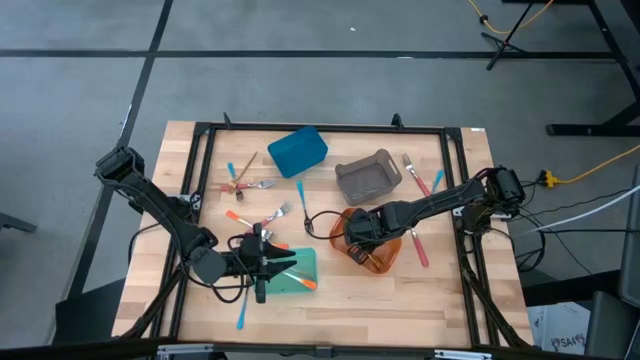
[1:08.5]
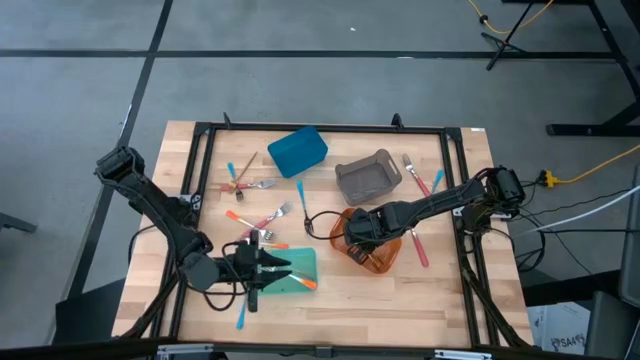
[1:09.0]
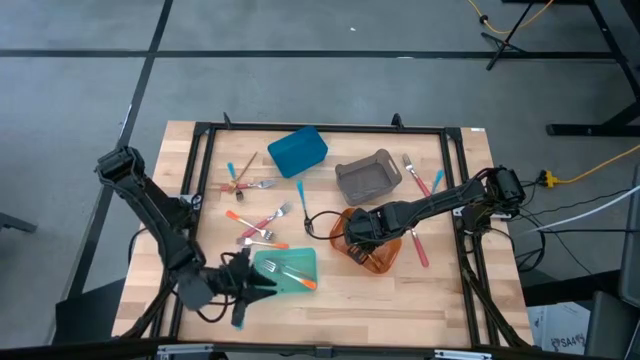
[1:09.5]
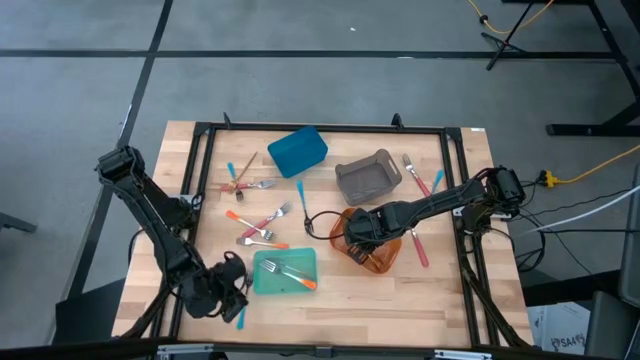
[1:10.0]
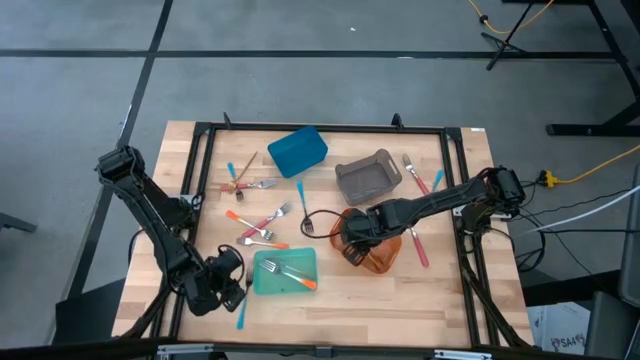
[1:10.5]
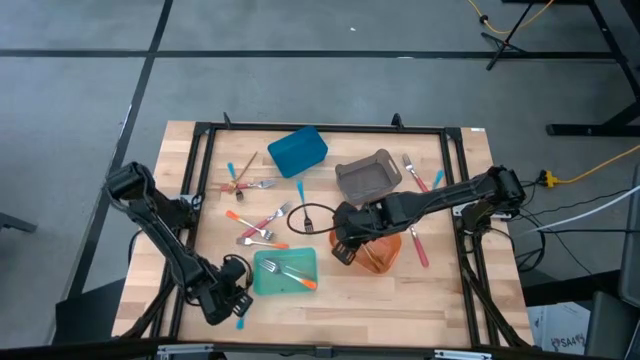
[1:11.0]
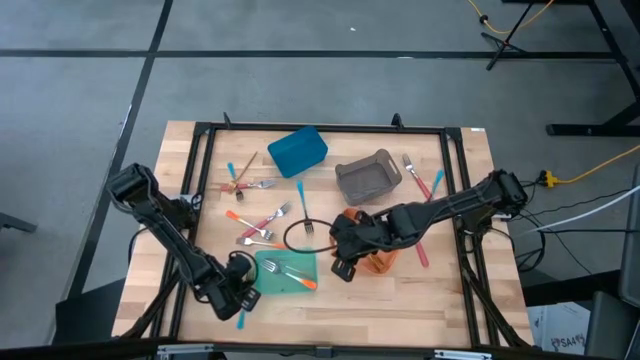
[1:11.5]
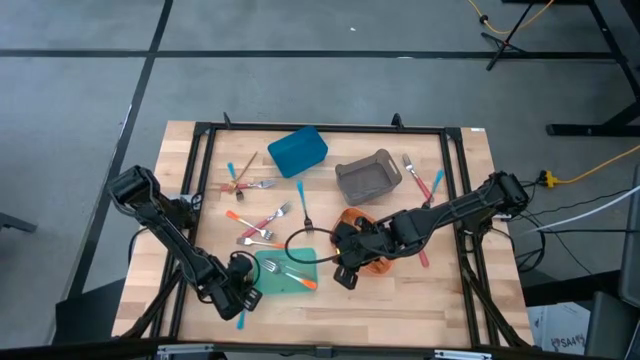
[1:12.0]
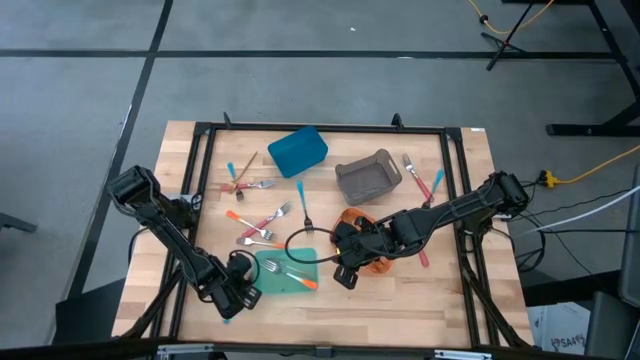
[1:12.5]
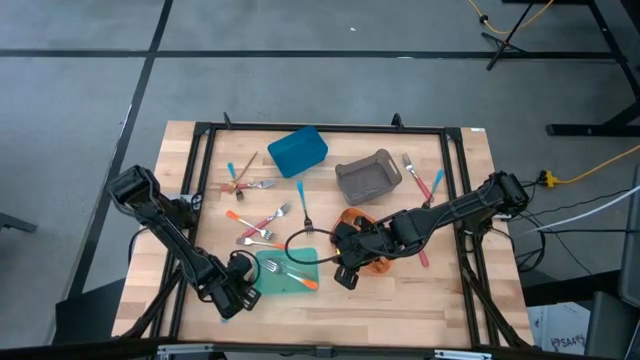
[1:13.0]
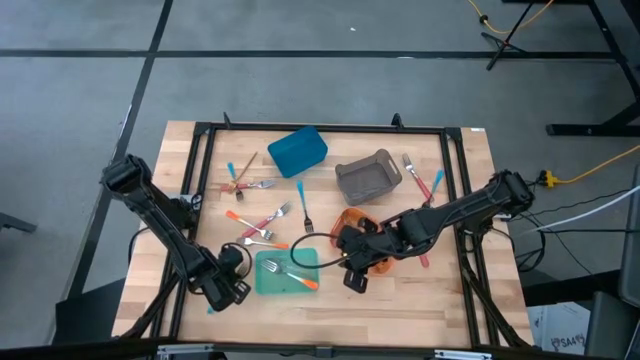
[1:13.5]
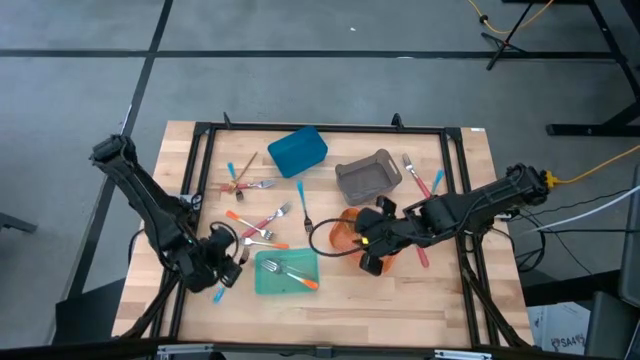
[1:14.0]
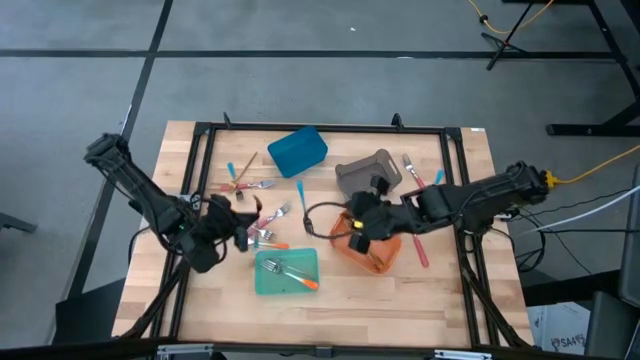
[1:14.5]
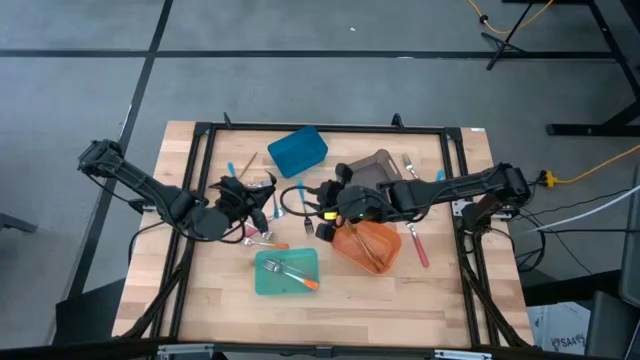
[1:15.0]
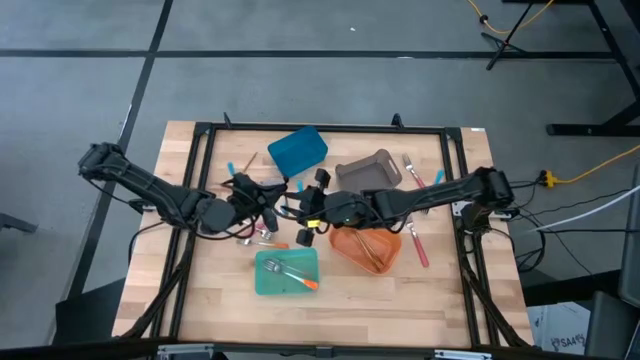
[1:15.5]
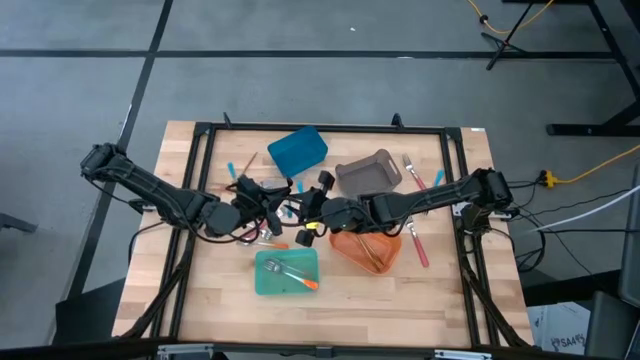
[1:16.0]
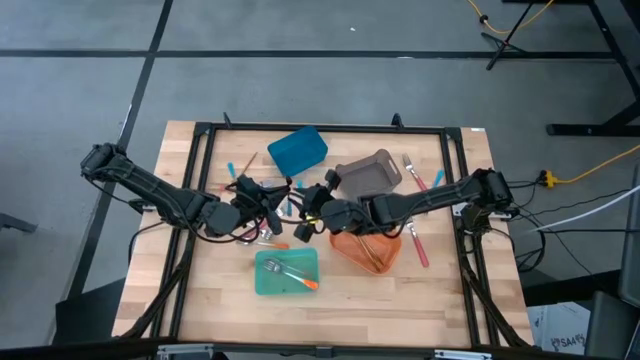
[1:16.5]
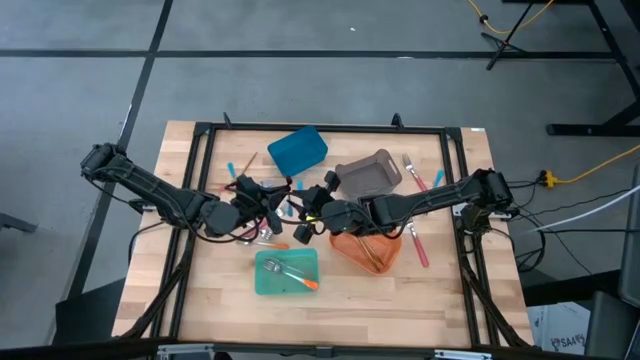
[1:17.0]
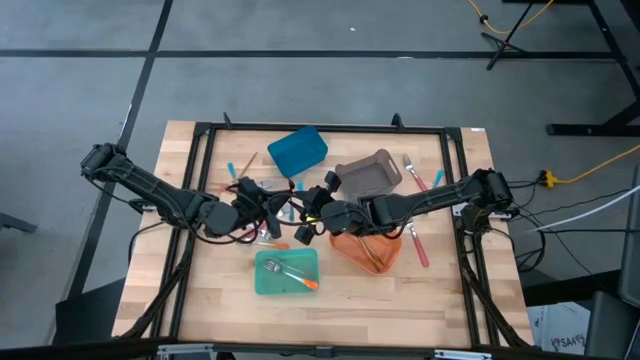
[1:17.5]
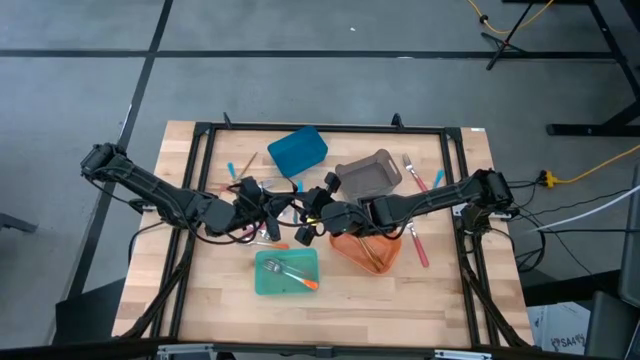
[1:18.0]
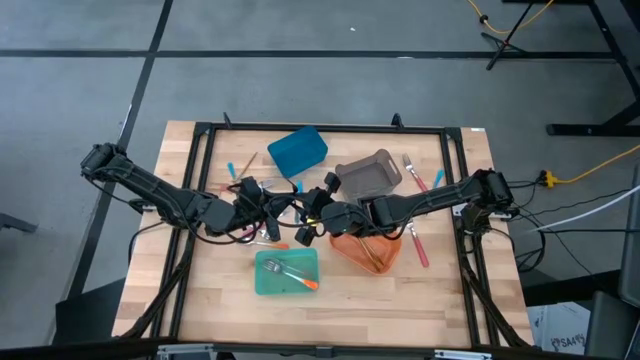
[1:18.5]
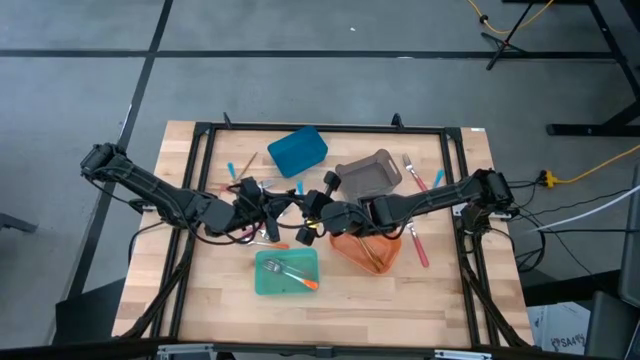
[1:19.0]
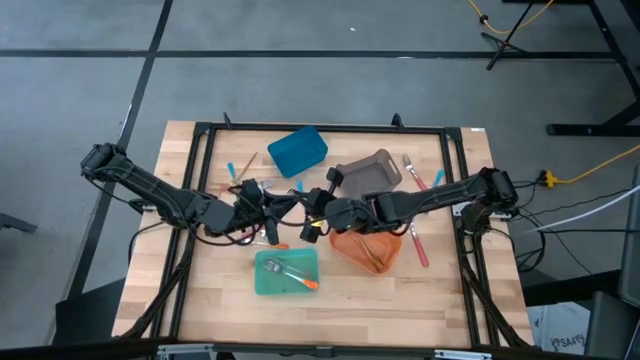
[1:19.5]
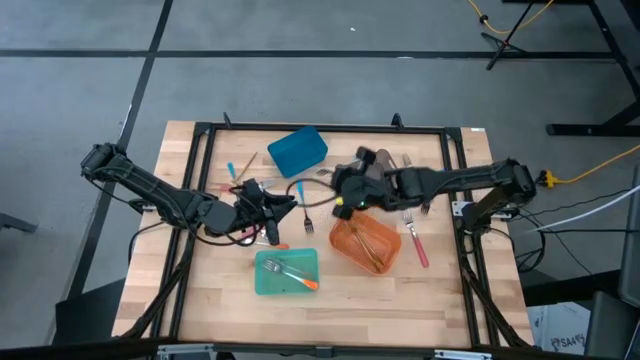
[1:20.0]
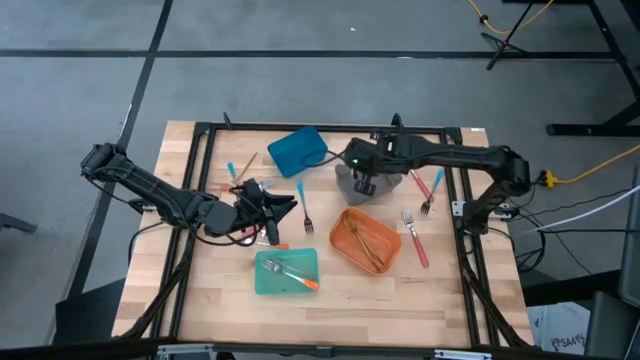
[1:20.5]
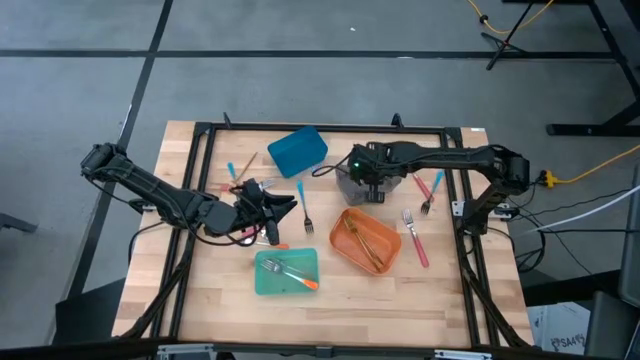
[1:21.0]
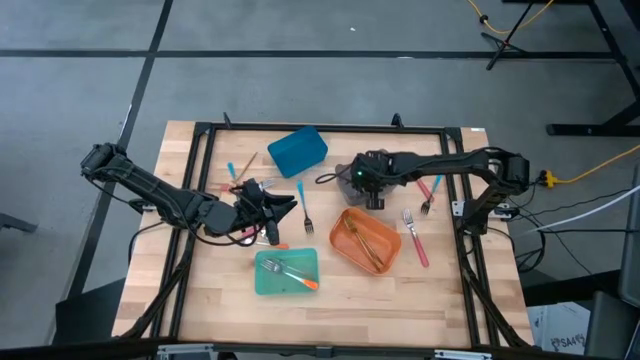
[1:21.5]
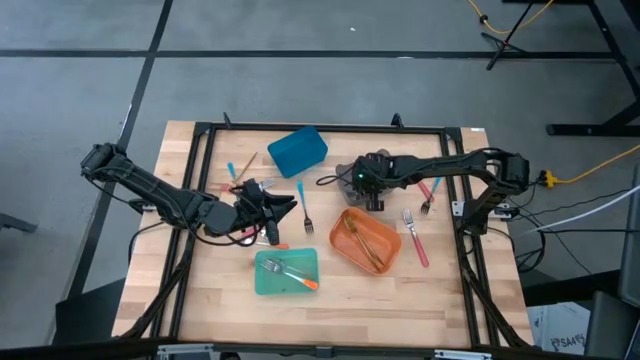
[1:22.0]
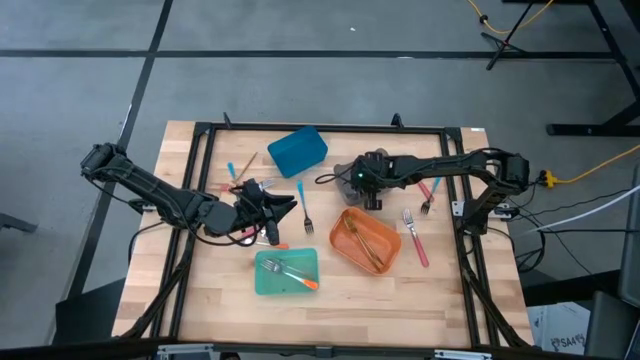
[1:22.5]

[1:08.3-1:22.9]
Task: Sort silverware by color (type)
Put the blue fork into the black bin

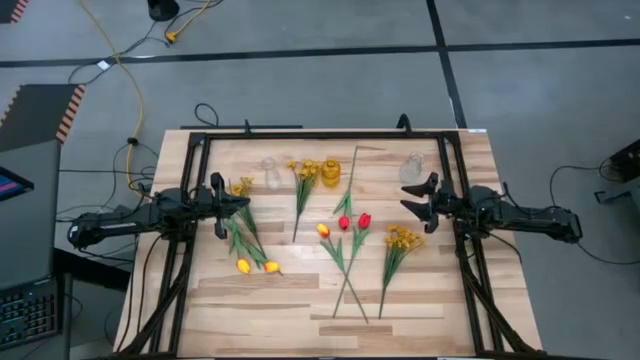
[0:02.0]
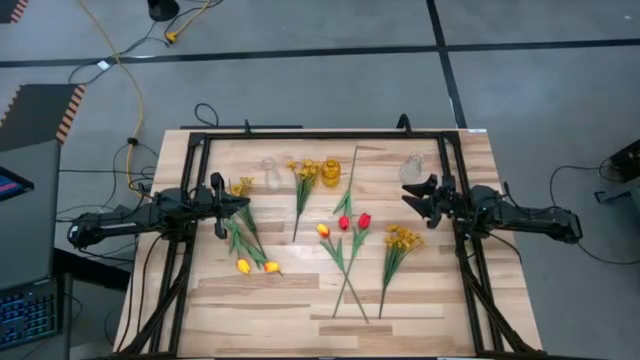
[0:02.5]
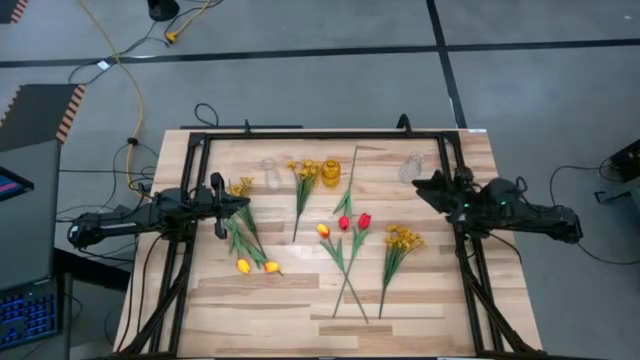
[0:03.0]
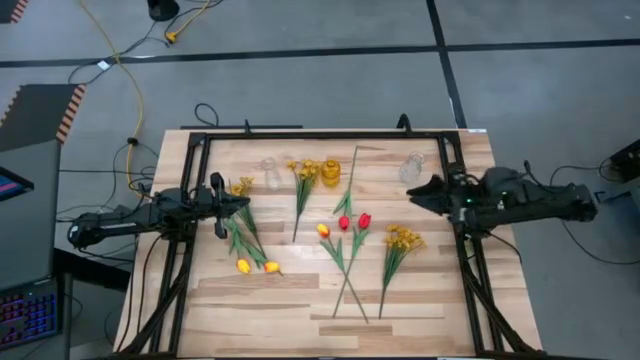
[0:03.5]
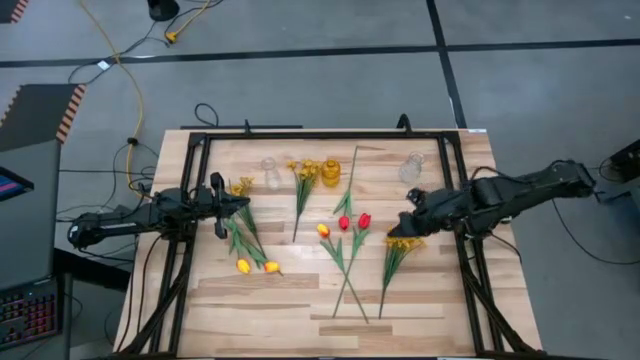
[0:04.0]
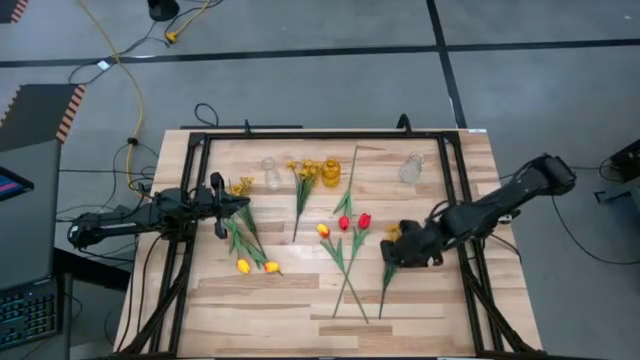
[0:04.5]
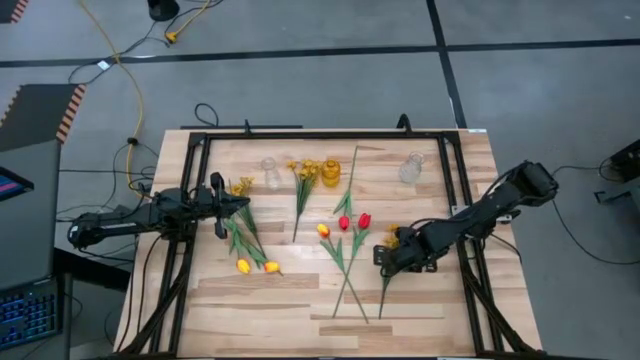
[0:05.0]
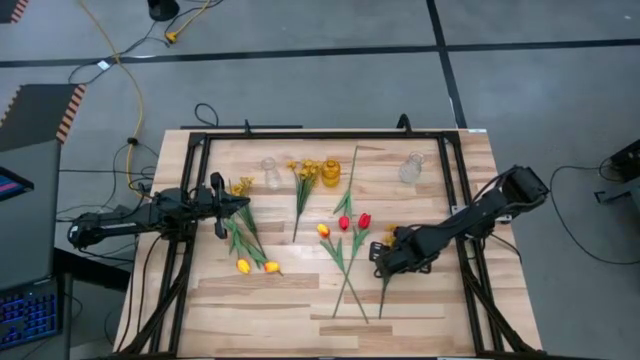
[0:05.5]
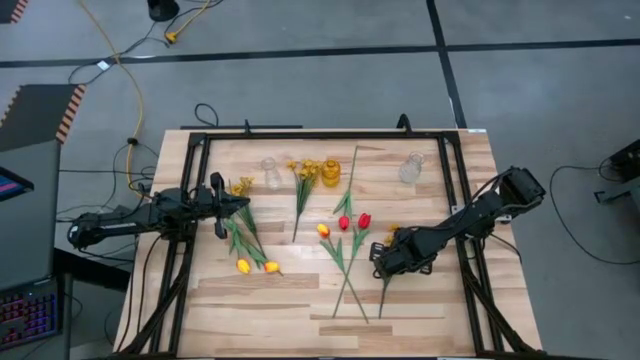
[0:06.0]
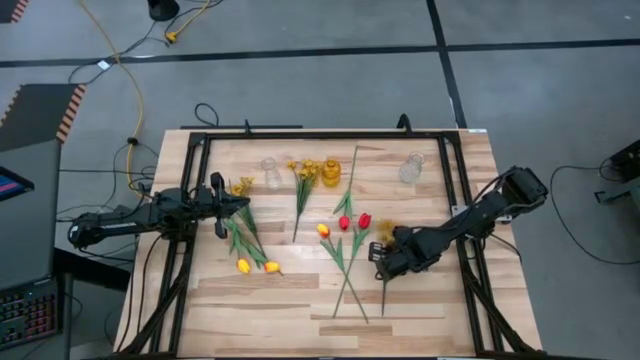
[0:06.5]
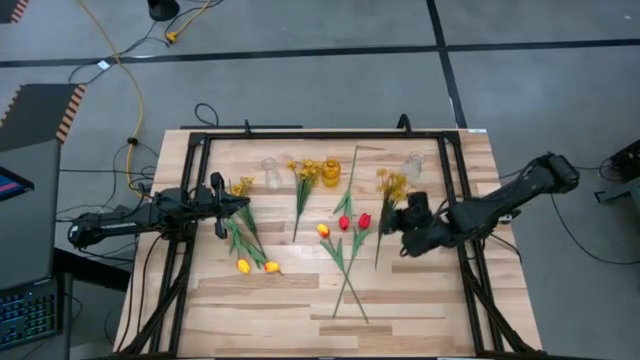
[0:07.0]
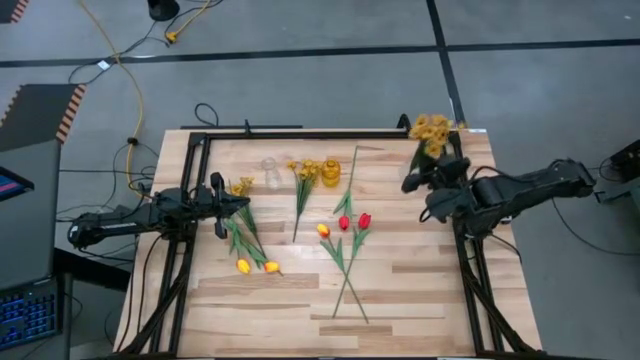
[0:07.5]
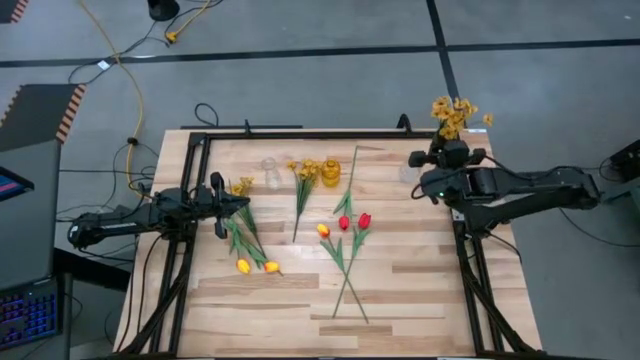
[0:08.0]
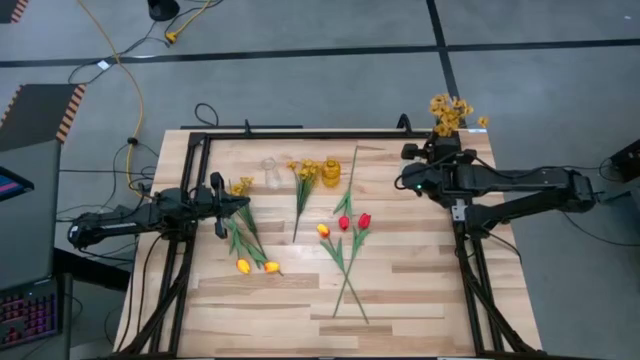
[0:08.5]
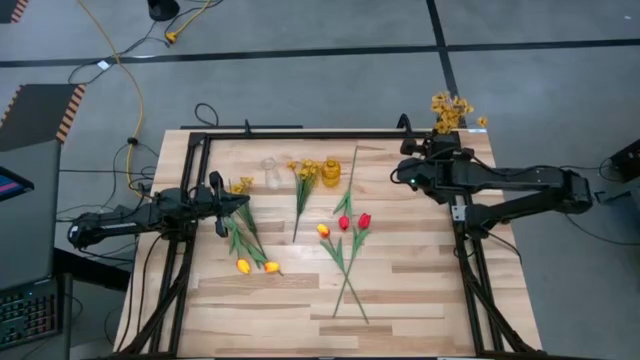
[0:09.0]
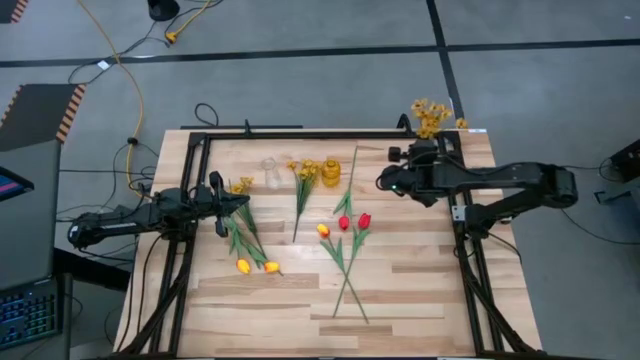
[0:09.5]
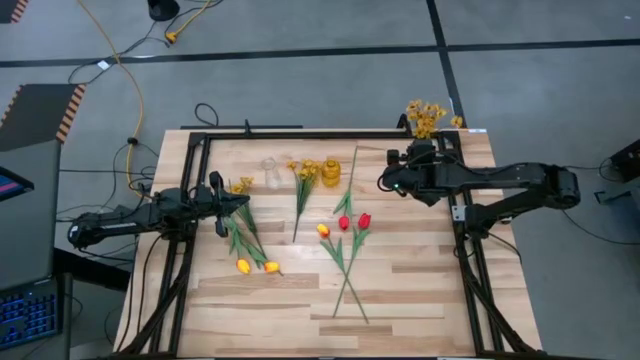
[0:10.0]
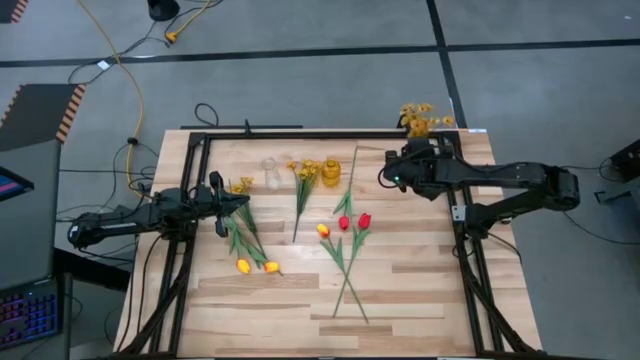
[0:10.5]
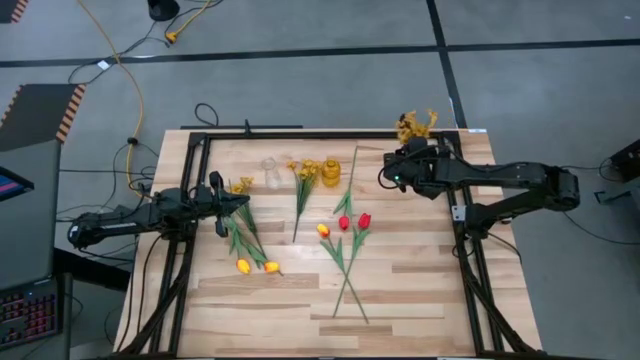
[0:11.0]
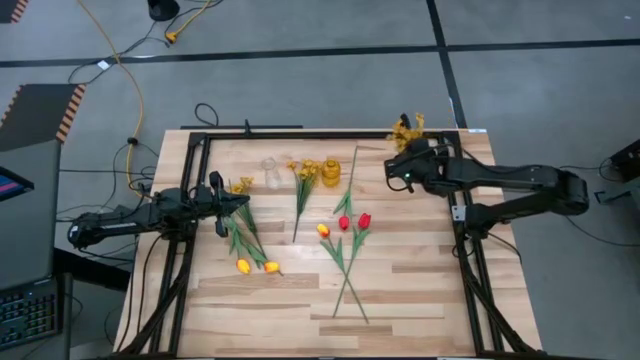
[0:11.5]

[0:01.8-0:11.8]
Task: Sort flowers into vase by color
Put the right yellow flowers into the right transparent flower vase
